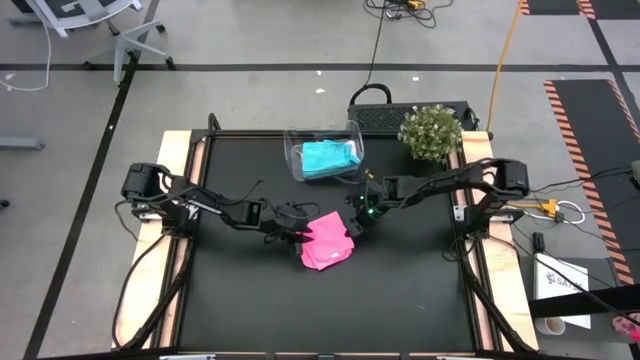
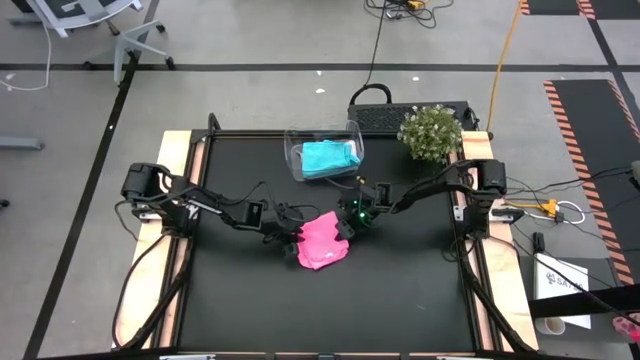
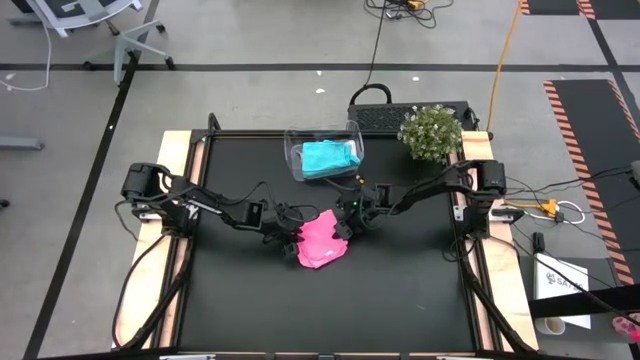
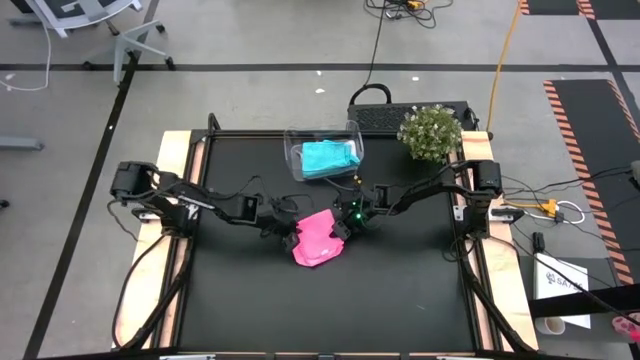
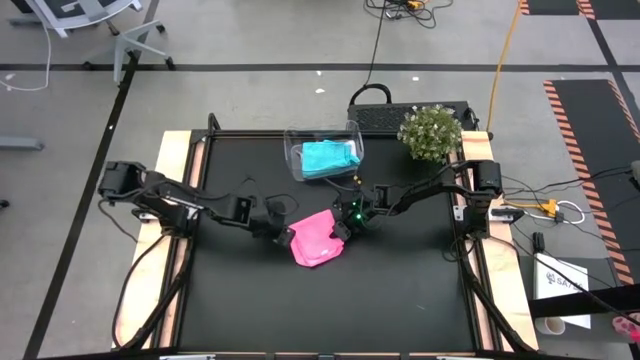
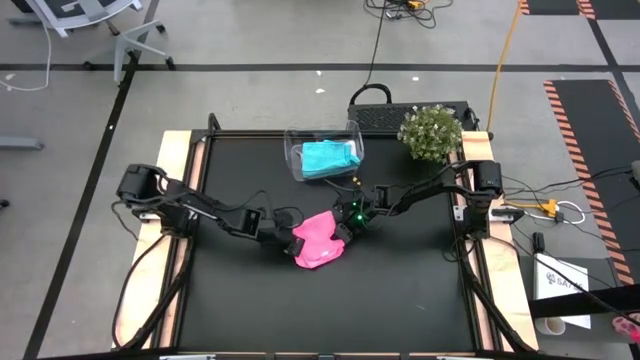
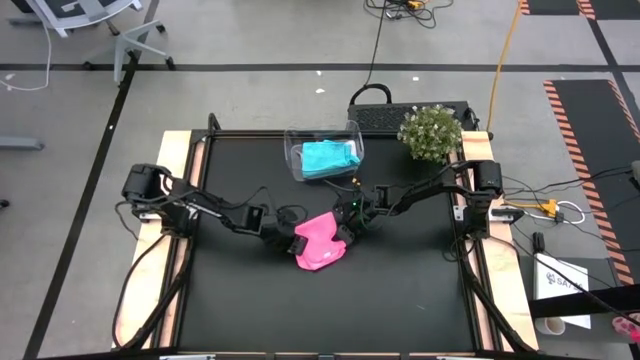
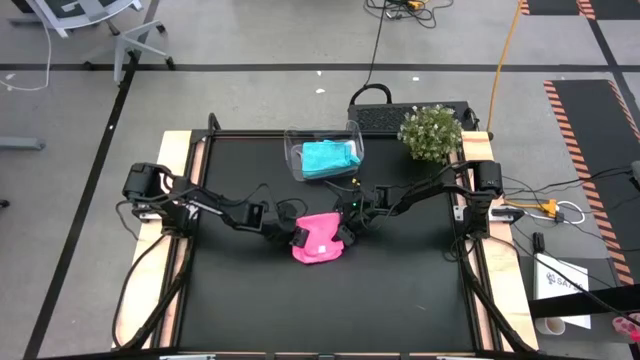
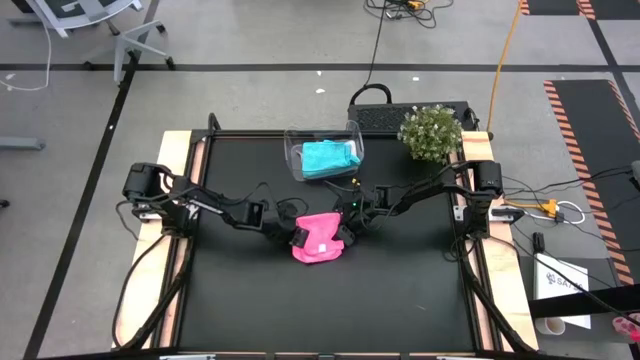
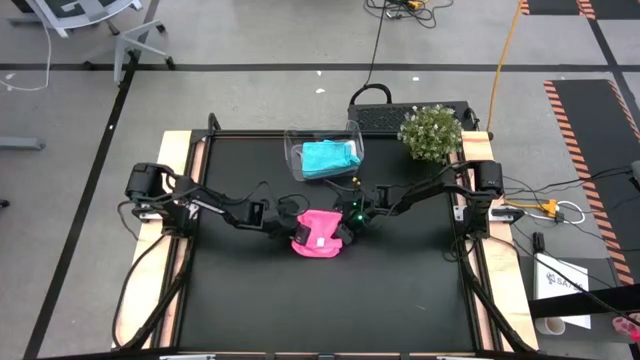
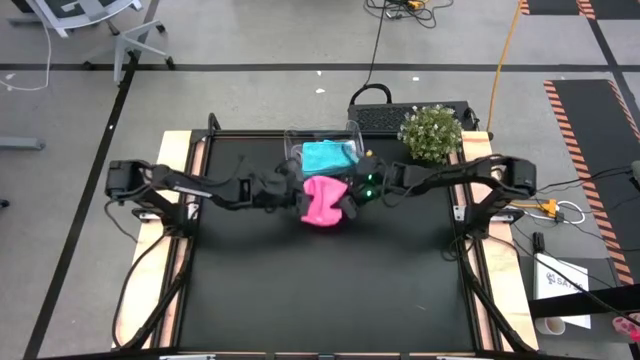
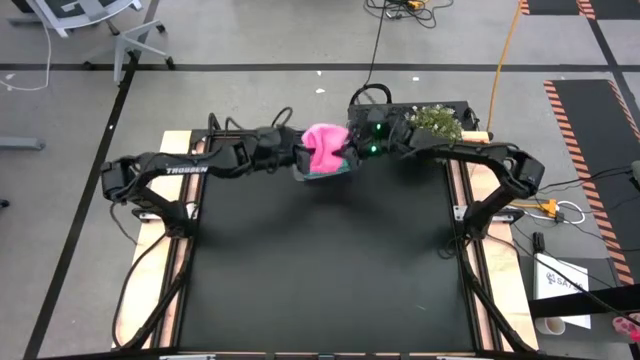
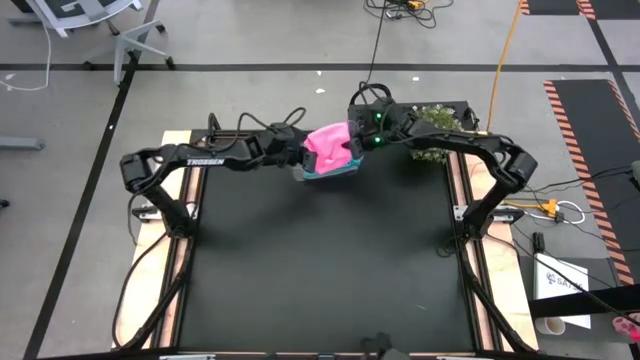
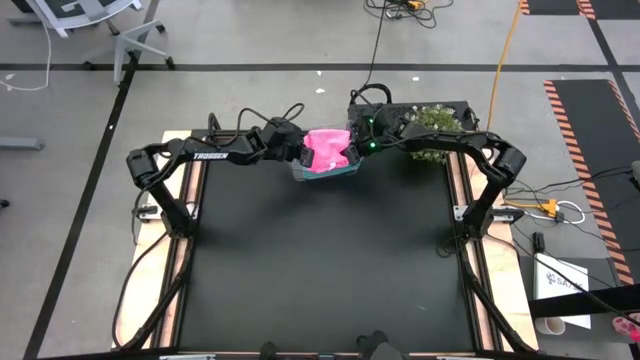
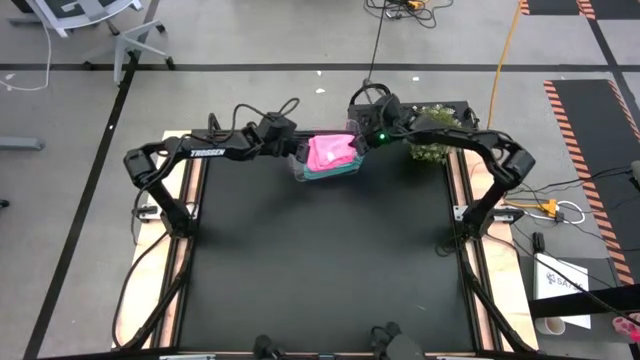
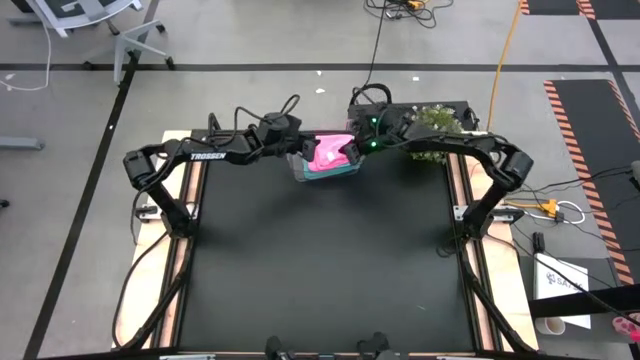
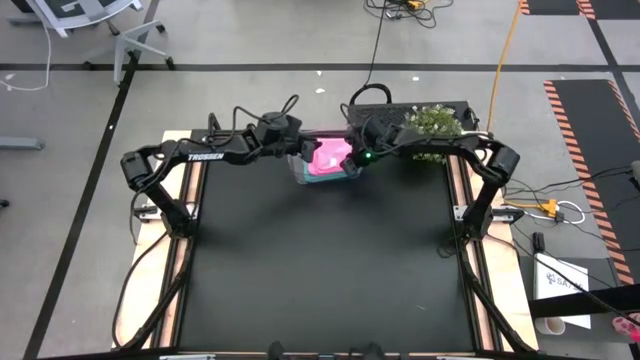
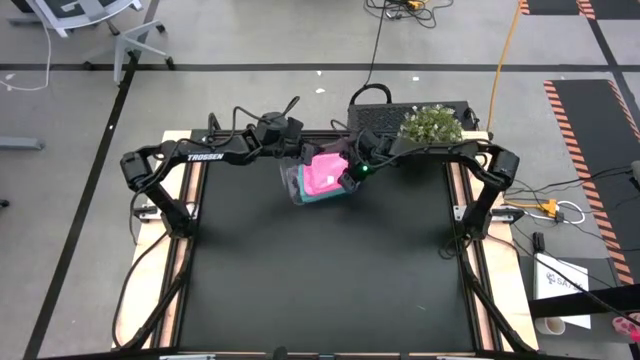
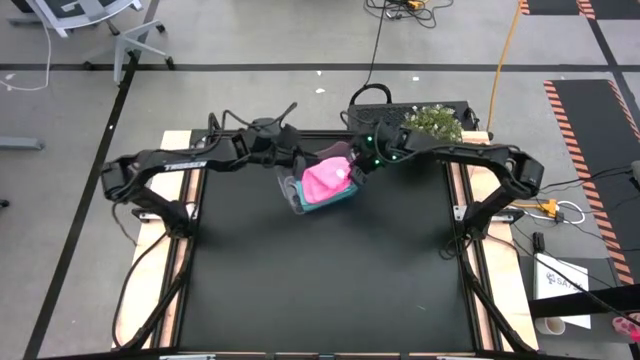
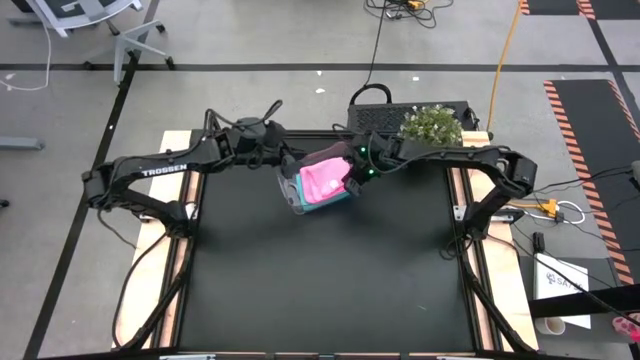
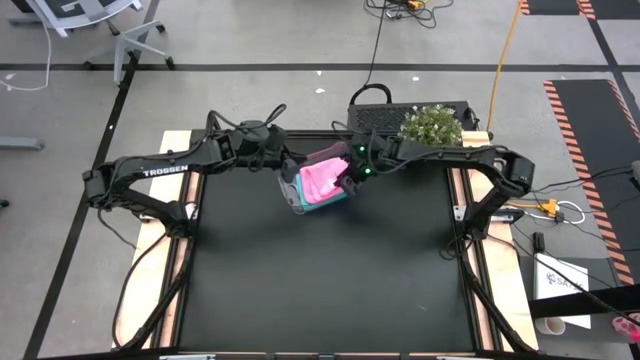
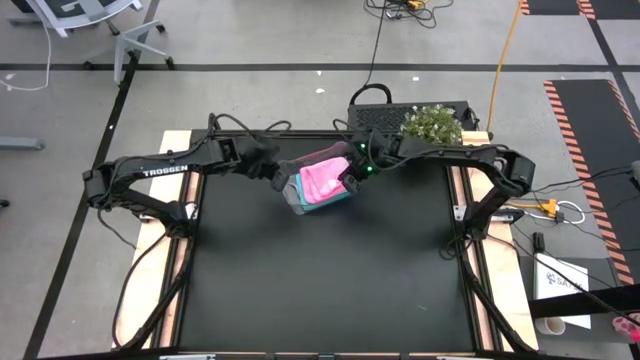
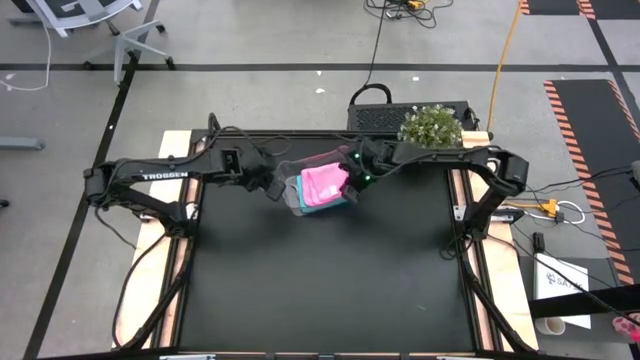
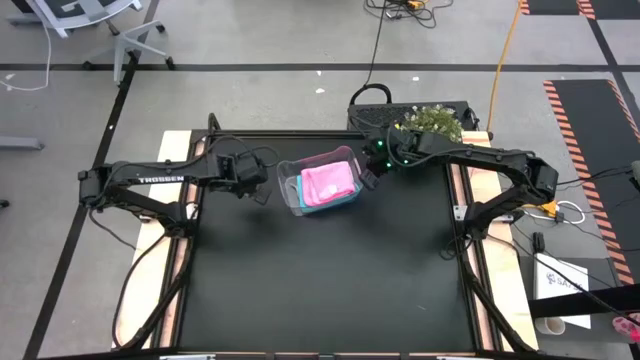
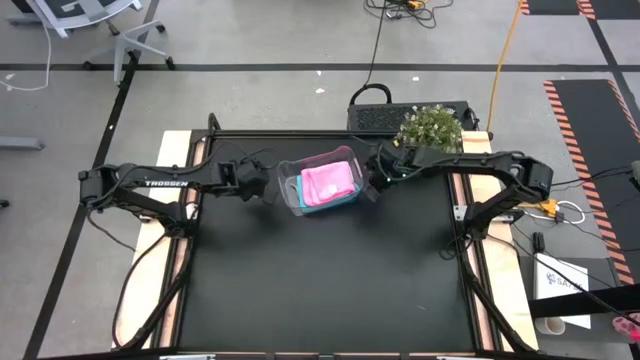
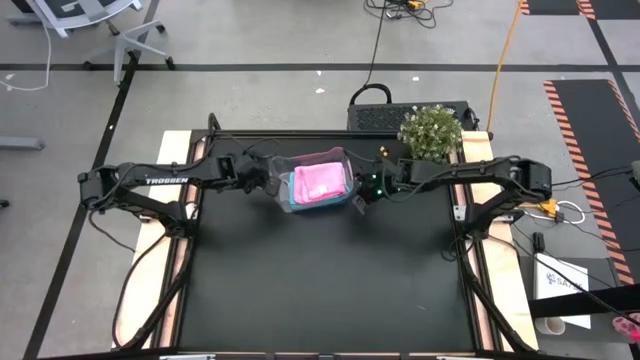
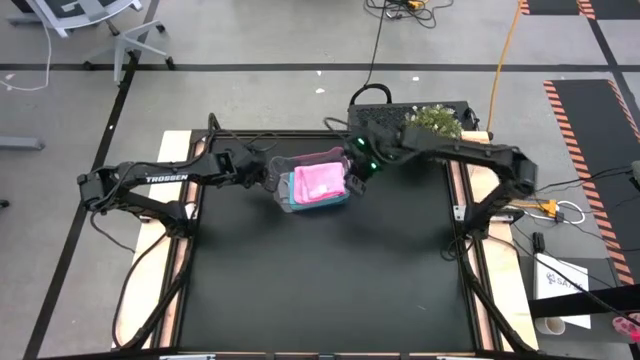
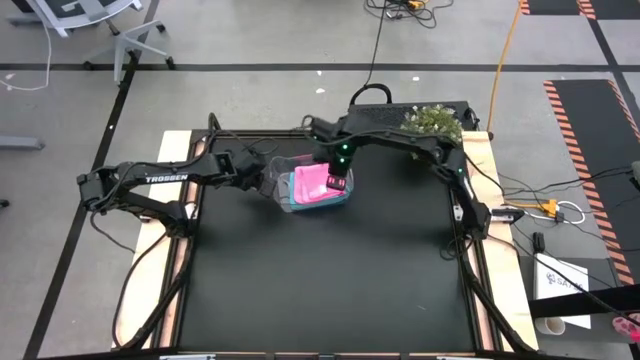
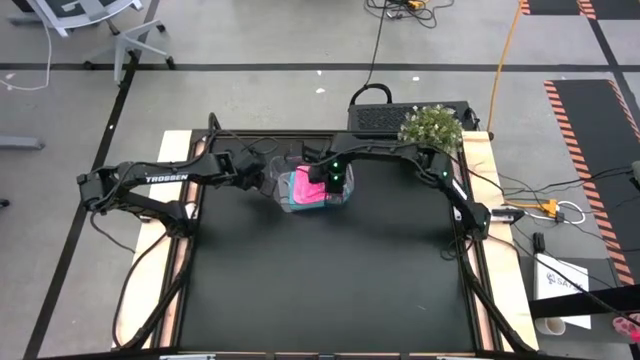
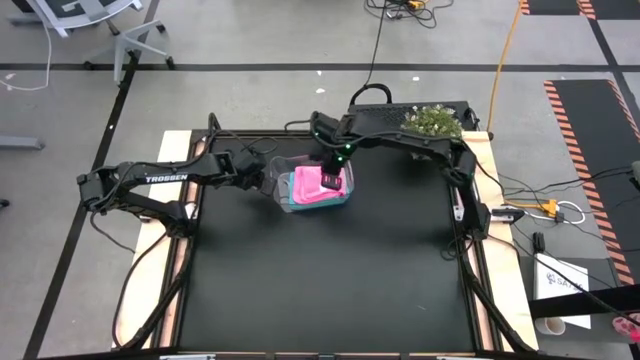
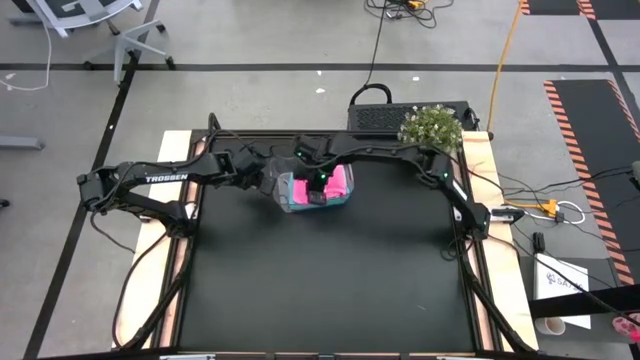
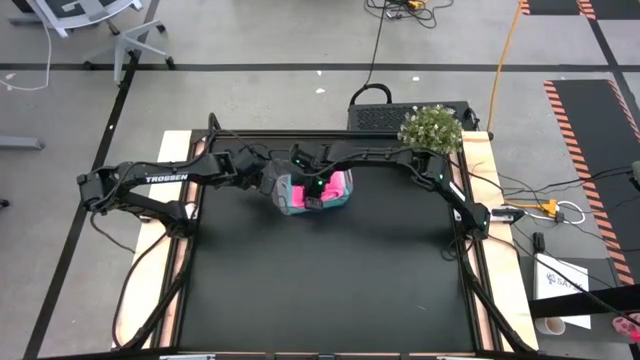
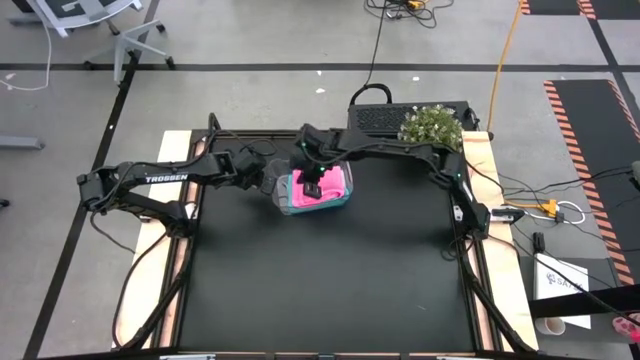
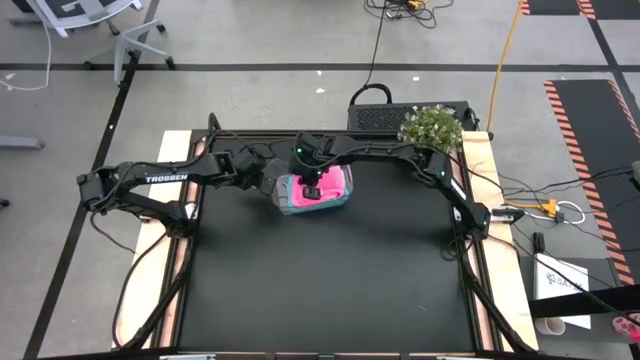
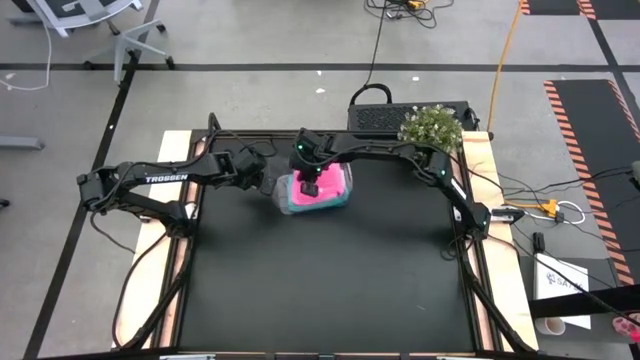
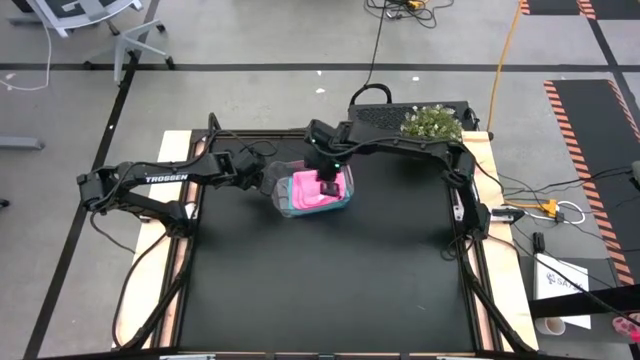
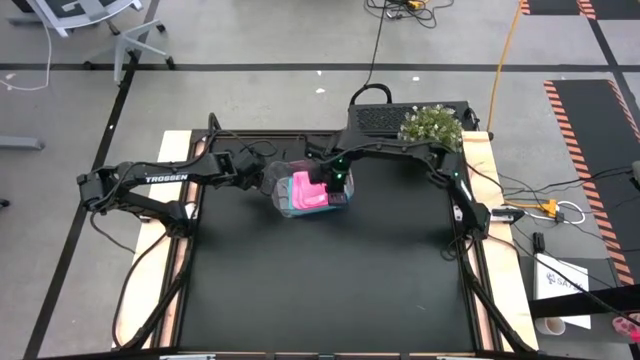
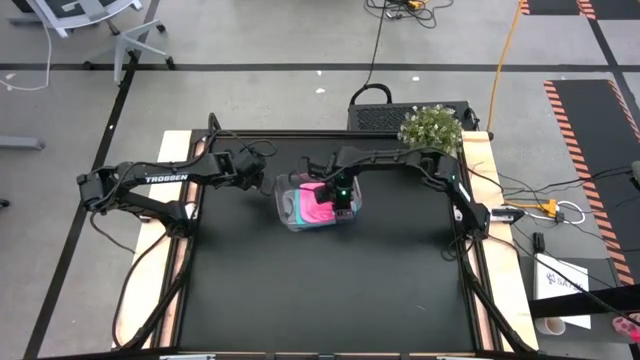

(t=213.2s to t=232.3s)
Task: Fold microfiber towels
Put the pink microfiber towel into the transparent bin
